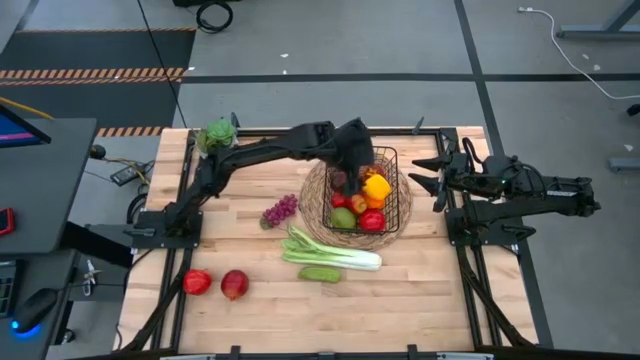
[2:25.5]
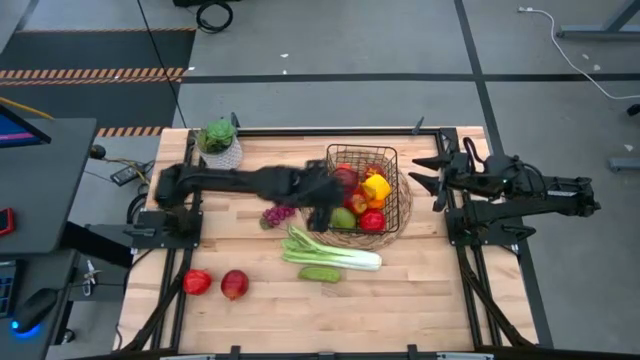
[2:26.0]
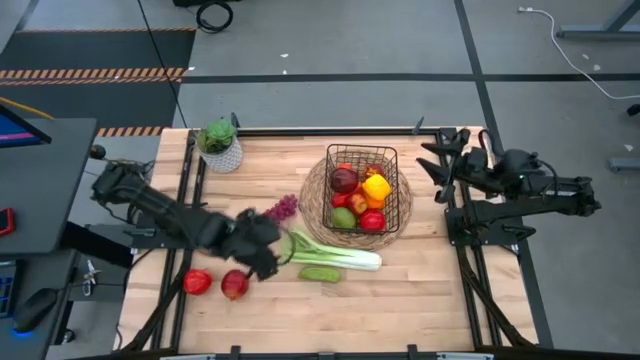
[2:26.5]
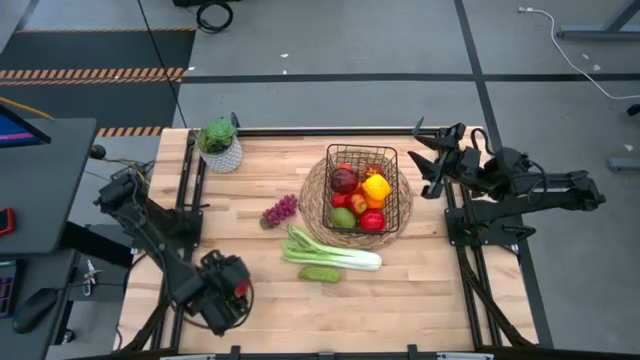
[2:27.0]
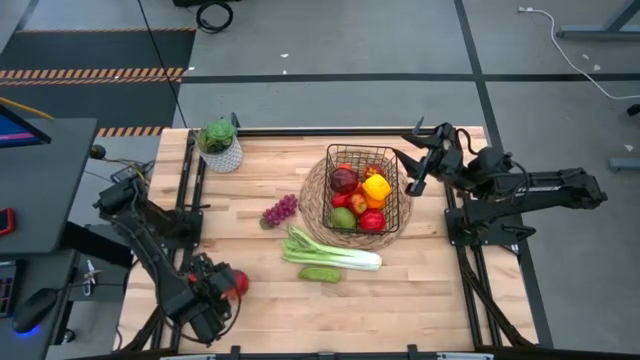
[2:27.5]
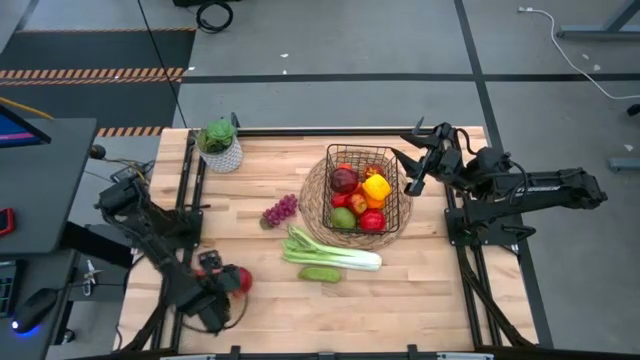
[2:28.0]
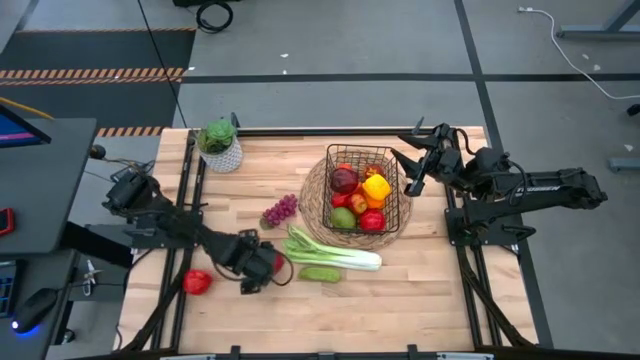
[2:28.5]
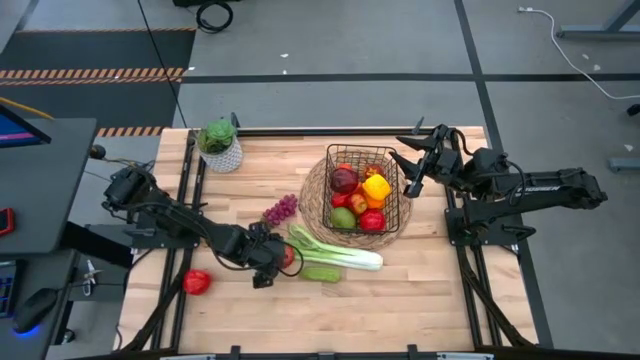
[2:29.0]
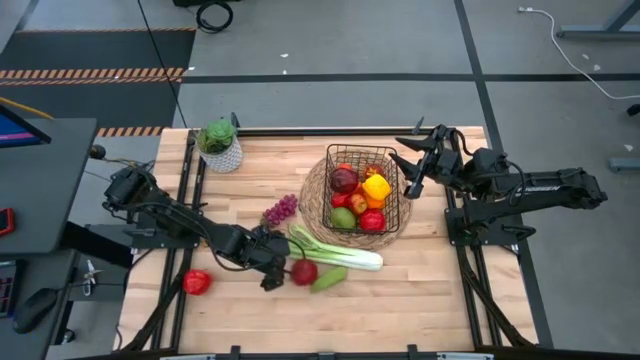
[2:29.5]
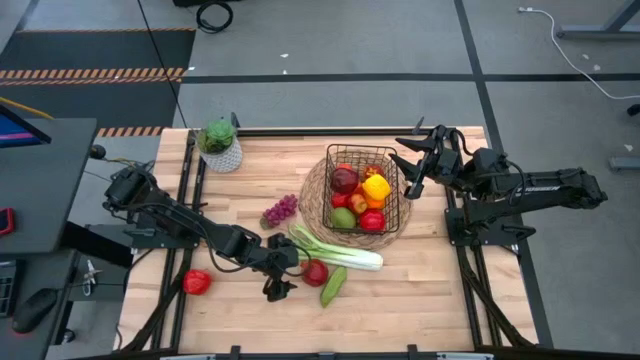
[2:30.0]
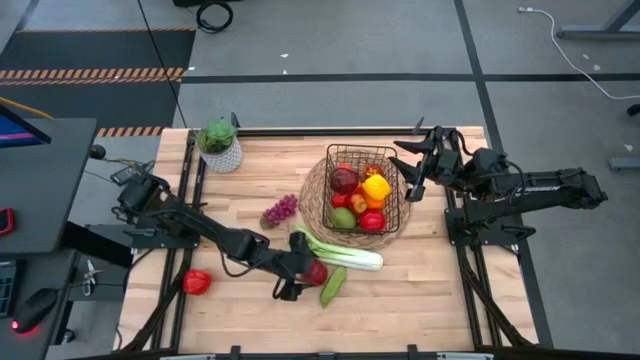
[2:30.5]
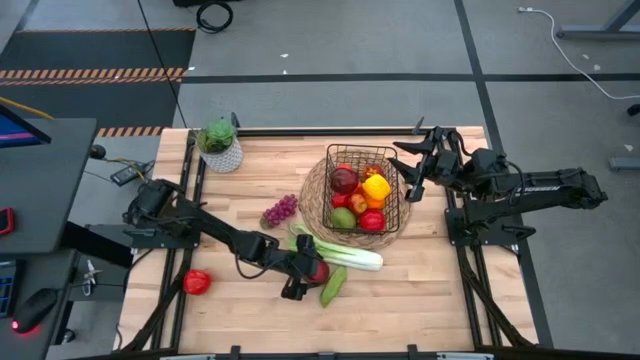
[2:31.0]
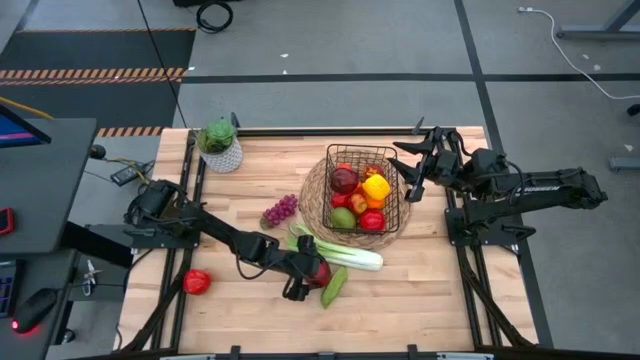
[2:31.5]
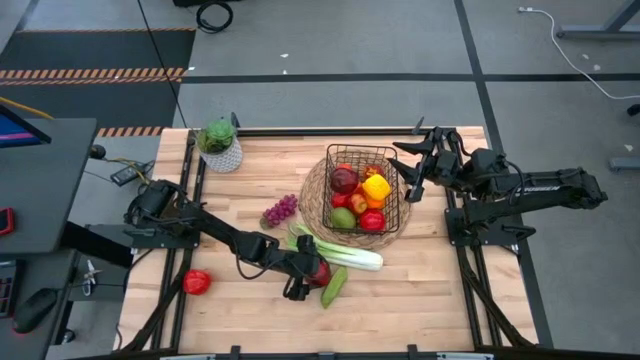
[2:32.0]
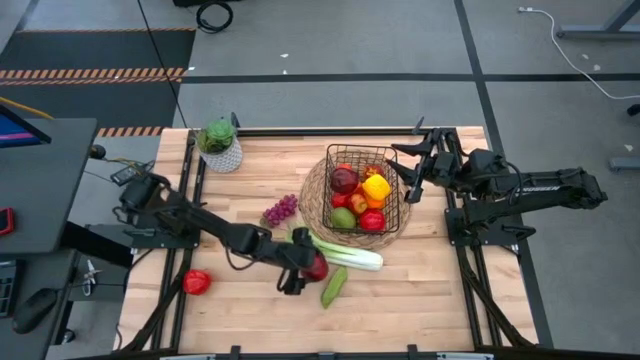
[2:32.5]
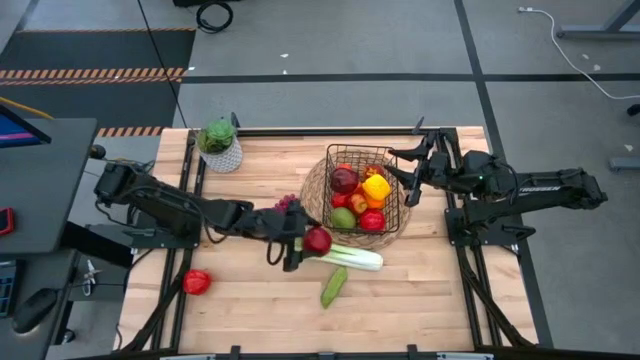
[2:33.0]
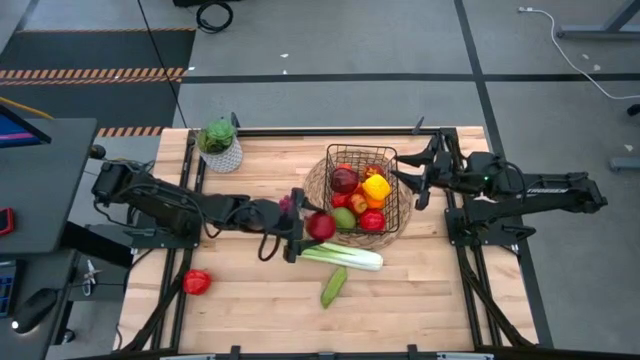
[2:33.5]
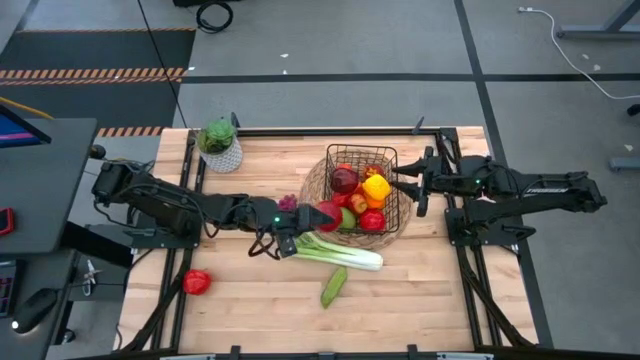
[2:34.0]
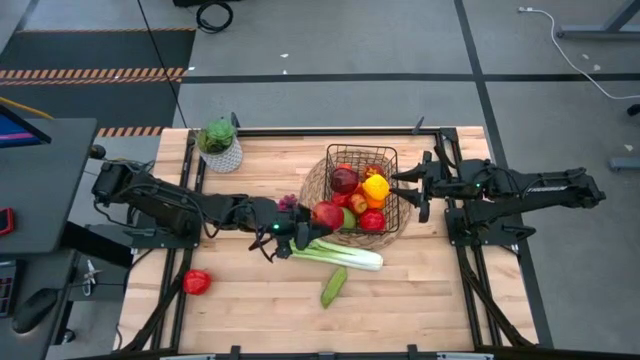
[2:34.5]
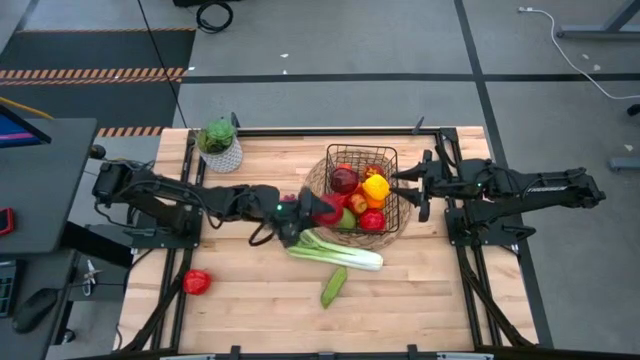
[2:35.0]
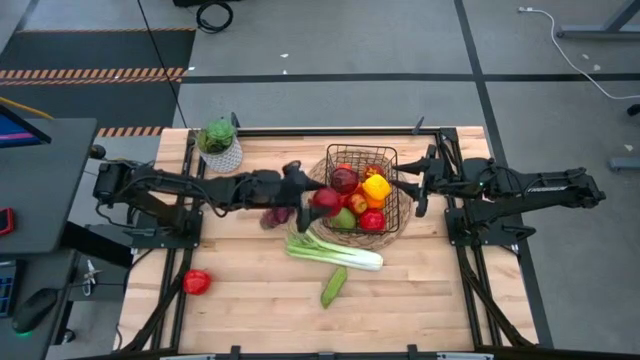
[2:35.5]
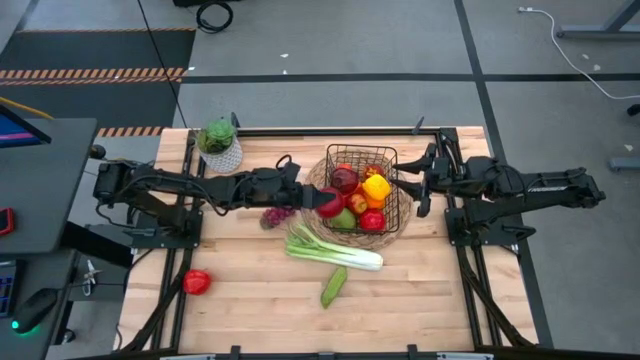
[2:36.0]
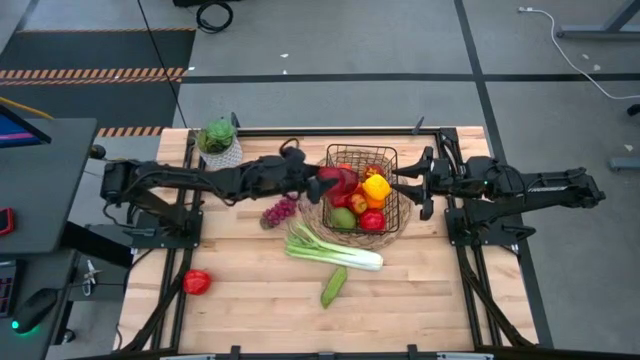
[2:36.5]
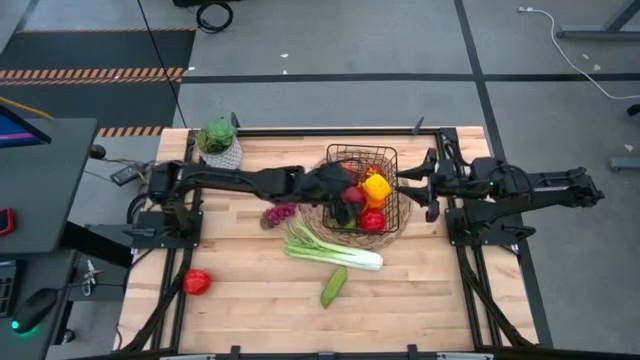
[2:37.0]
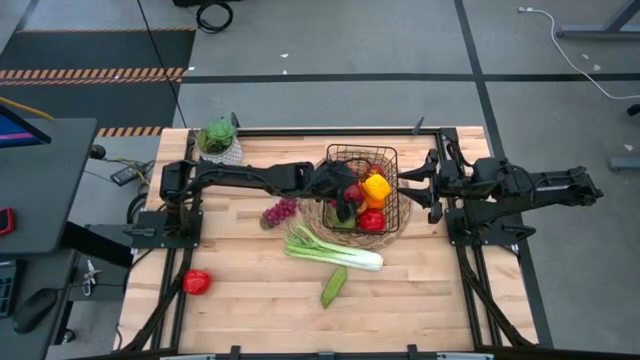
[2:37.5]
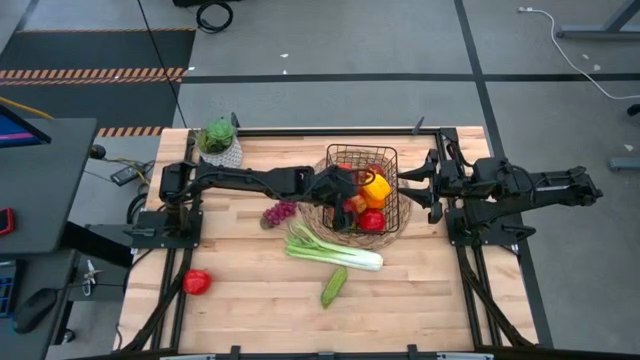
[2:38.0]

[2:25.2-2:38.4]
Task: Build produce basket
Put the pomegranate into the wire basket

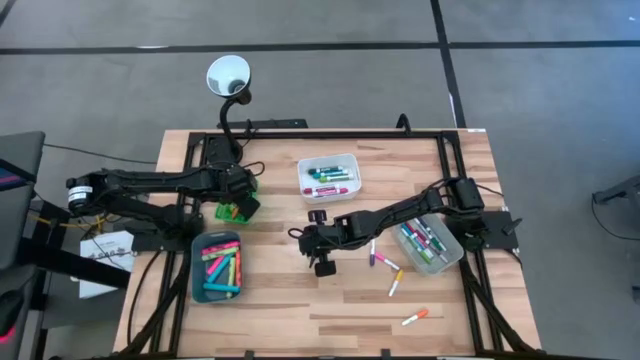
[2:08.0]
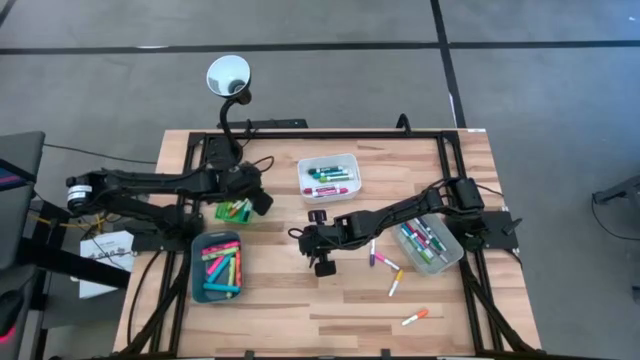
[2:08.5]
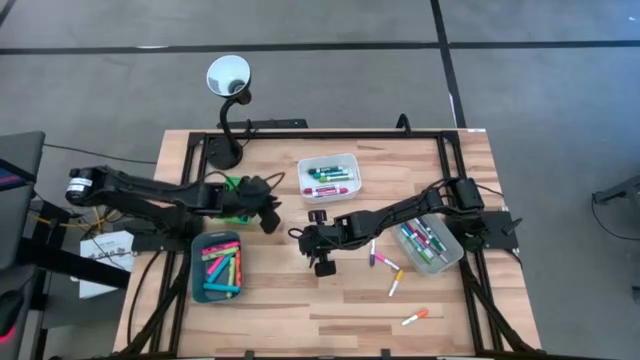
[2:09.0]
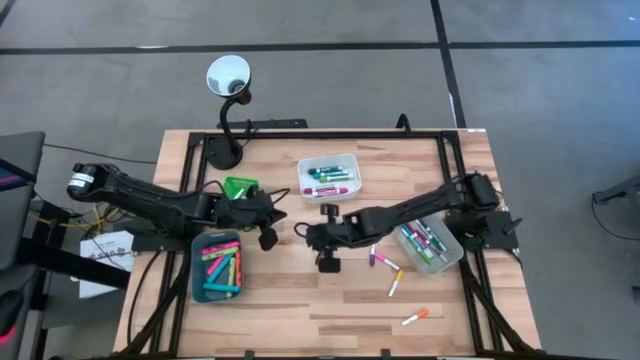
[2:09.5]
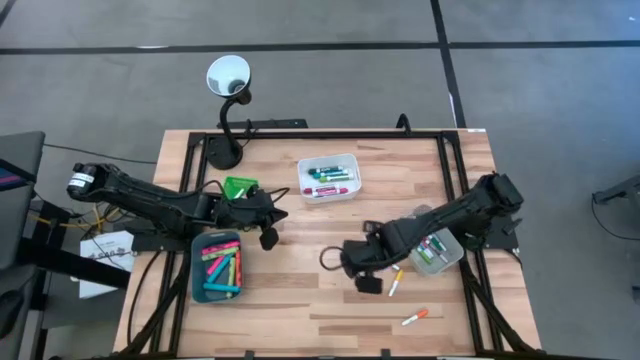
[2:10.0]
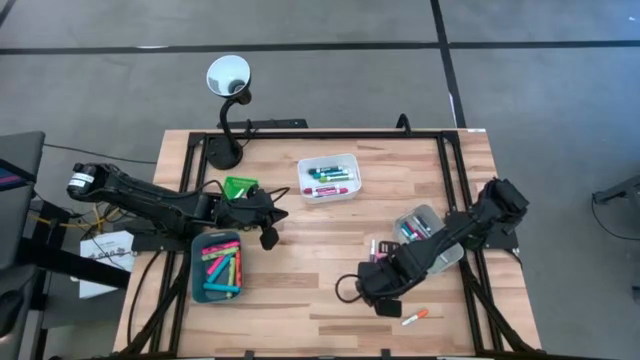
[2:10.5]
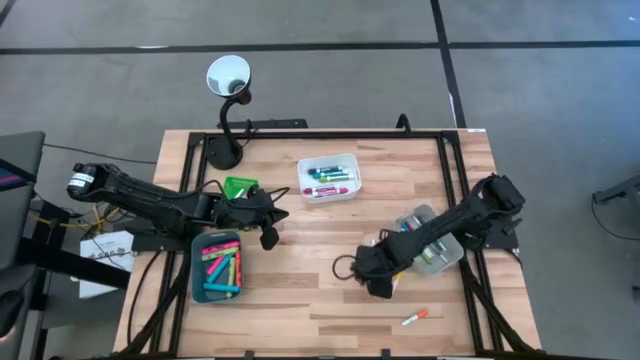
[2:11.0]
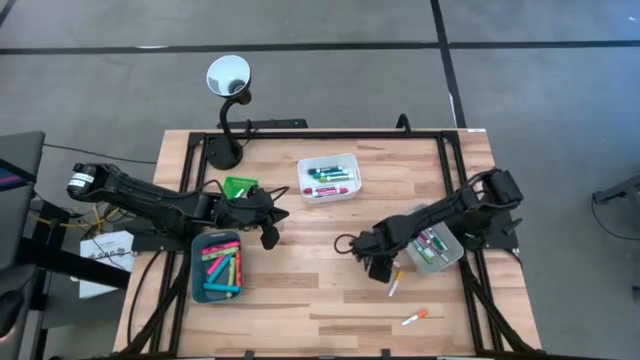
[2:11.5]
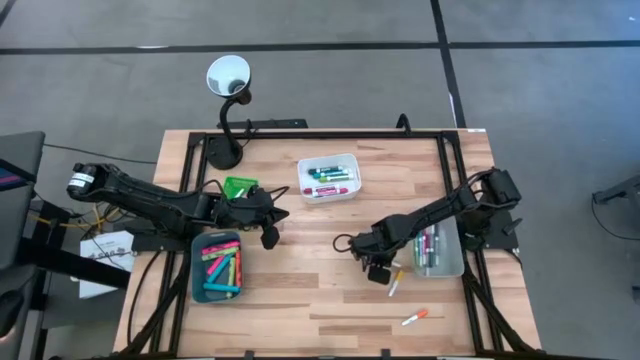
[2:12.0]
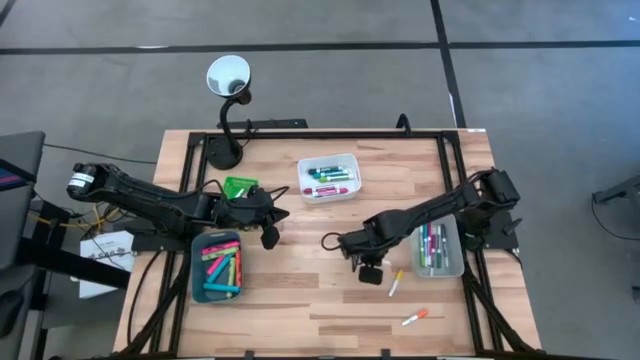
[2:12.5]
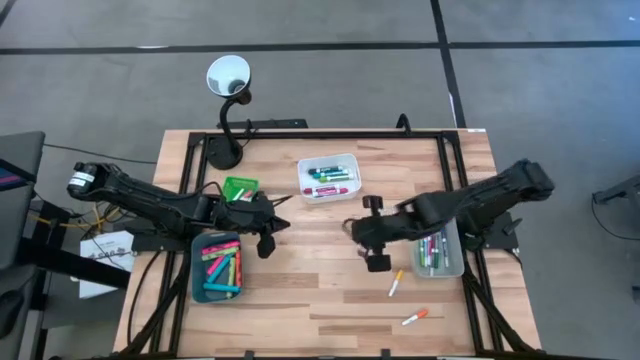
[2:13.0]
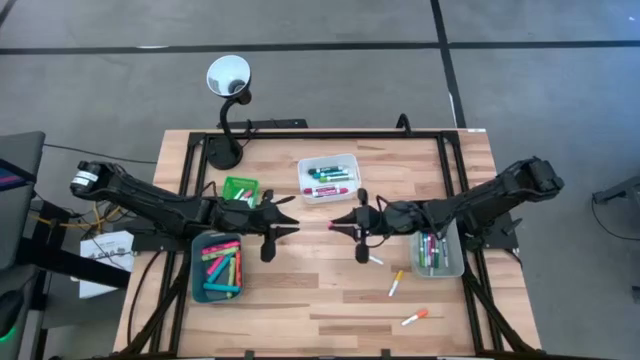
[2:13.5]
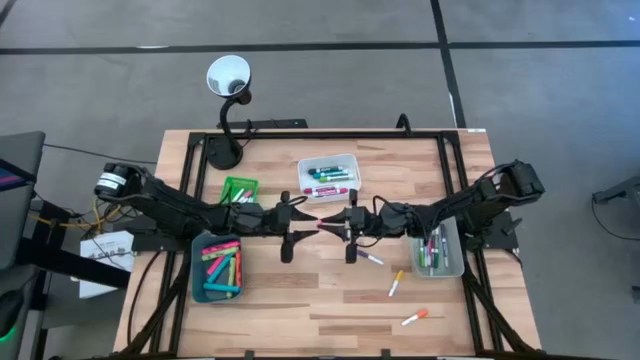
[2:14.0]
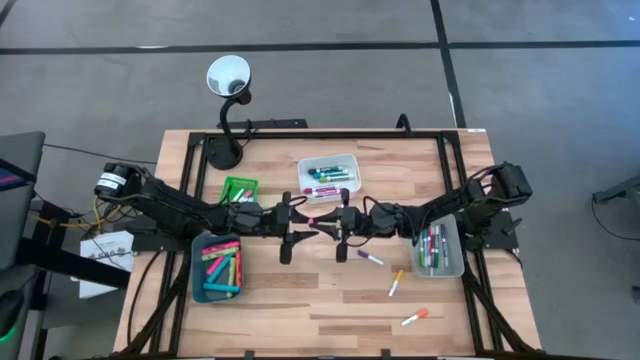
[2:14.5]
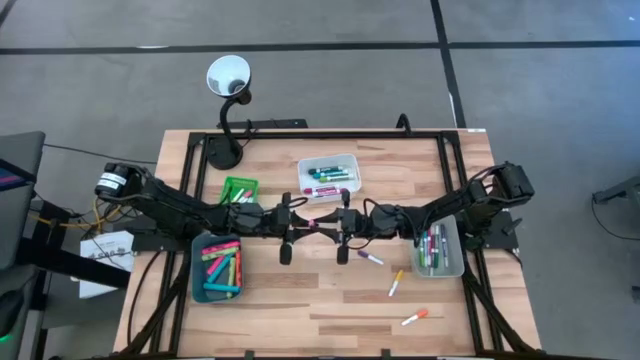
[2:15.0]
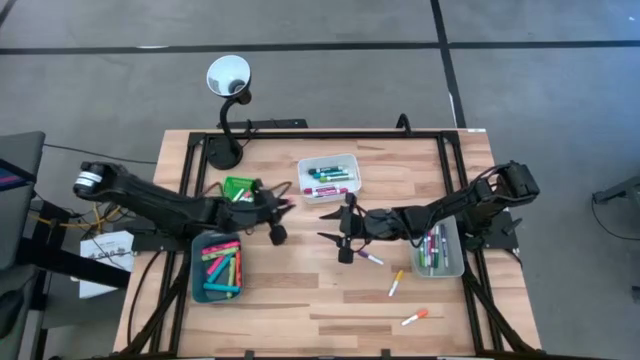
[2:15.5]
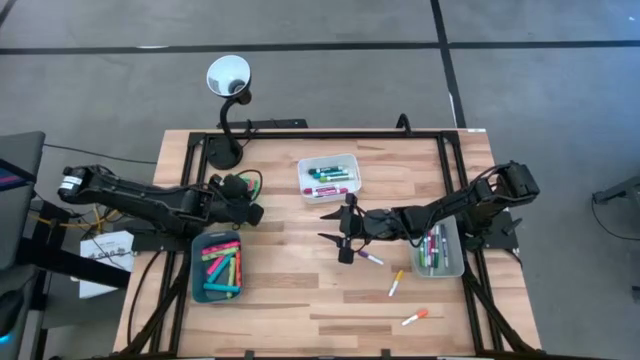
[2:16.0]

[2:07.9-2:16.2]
Task: Pick & Place Markers
Put the small pink highlighter pen into the green bin
